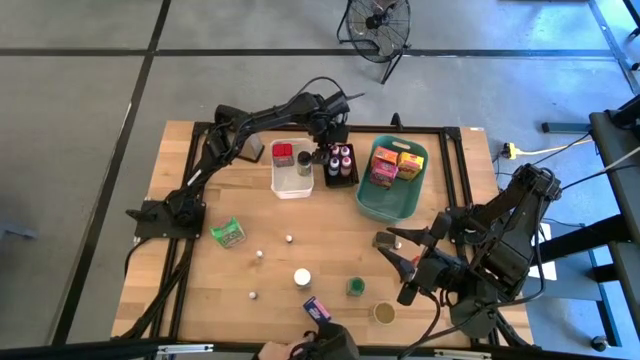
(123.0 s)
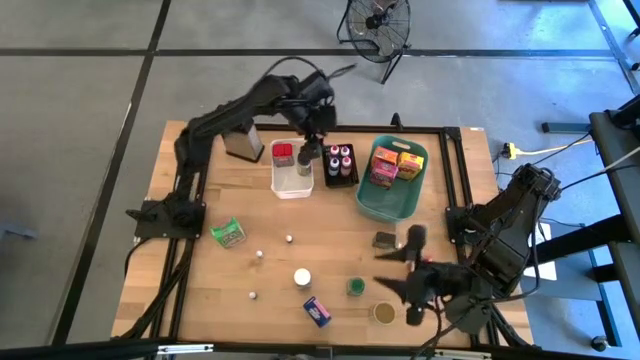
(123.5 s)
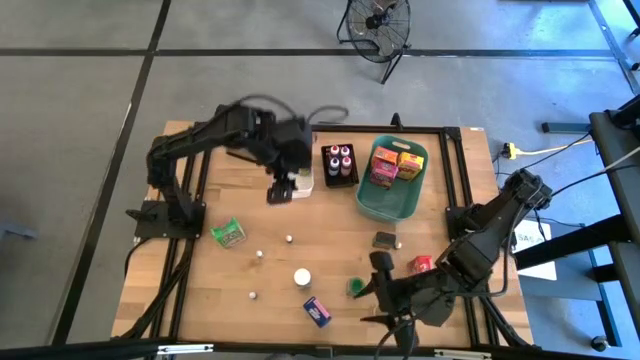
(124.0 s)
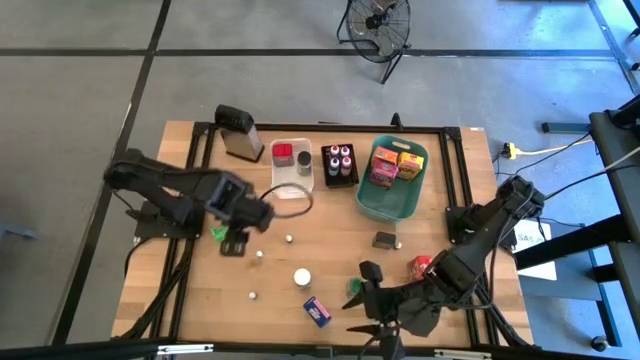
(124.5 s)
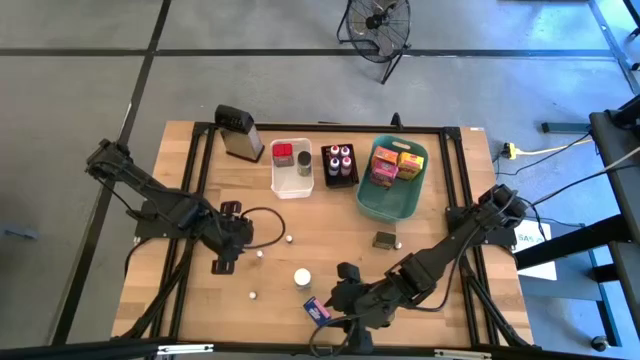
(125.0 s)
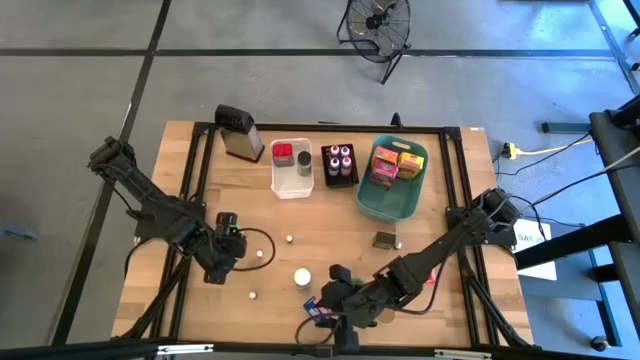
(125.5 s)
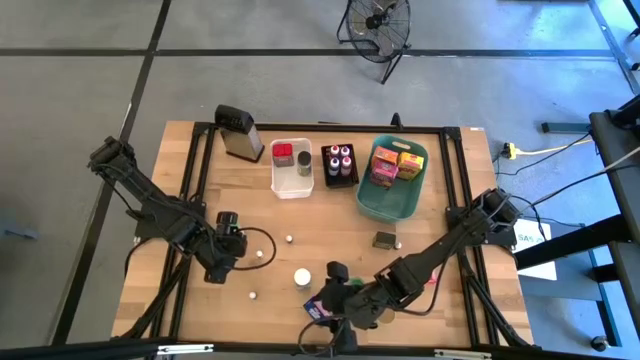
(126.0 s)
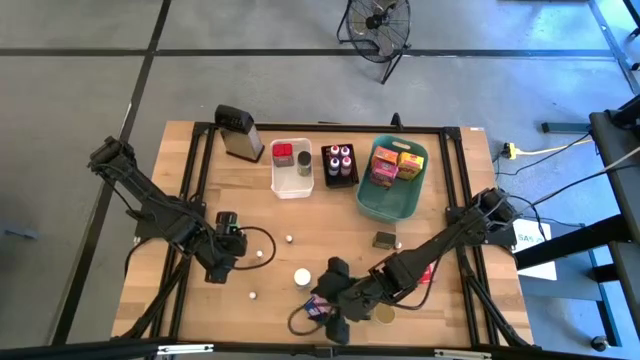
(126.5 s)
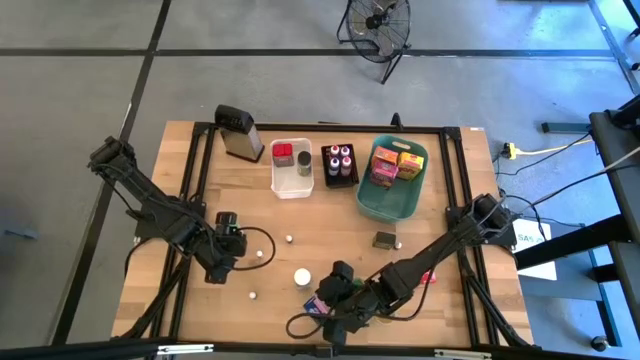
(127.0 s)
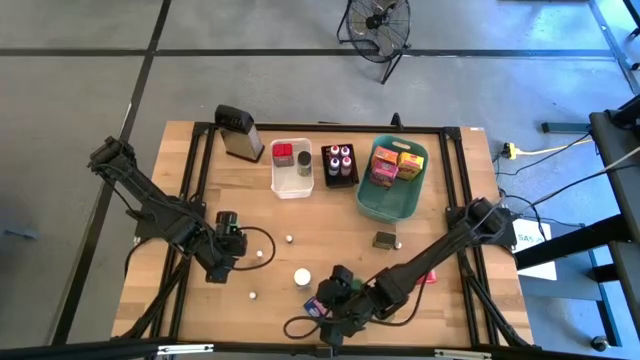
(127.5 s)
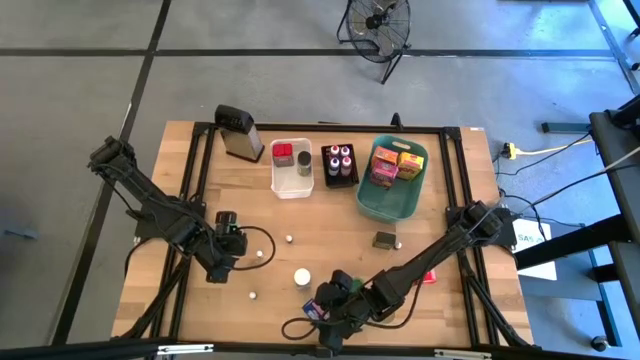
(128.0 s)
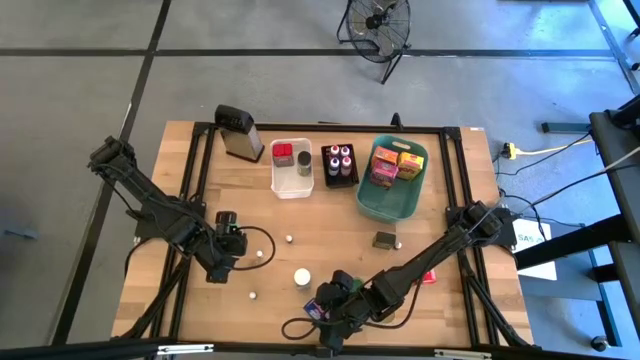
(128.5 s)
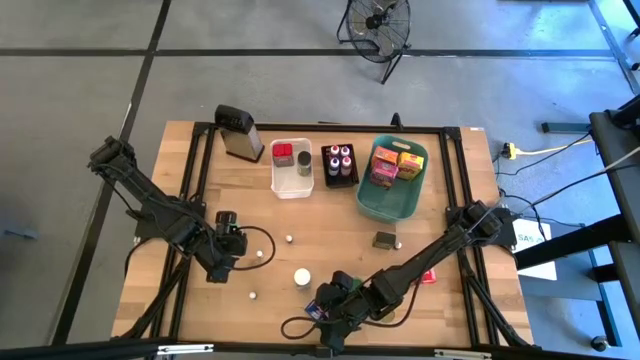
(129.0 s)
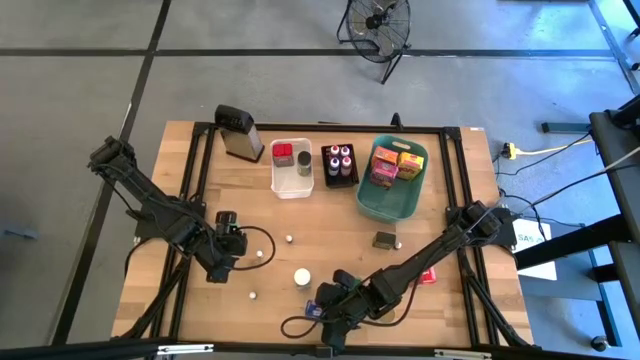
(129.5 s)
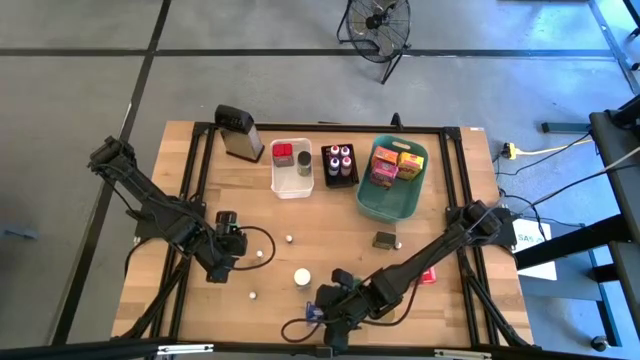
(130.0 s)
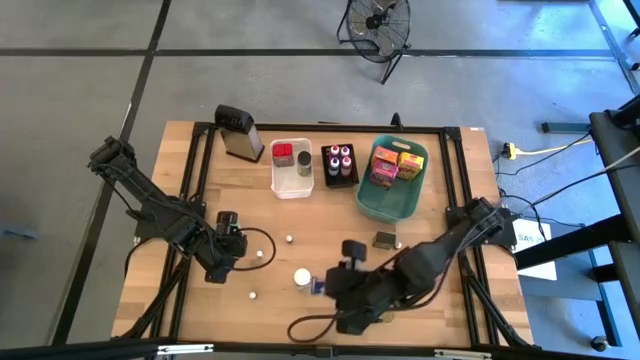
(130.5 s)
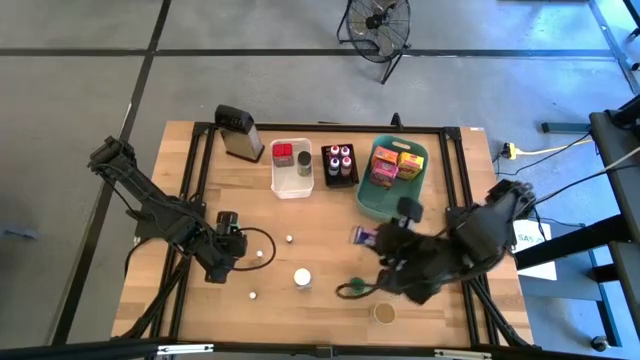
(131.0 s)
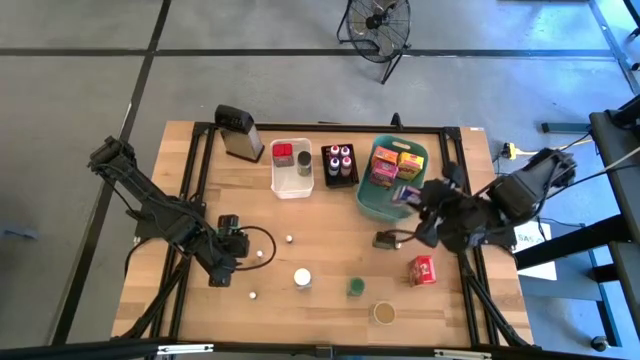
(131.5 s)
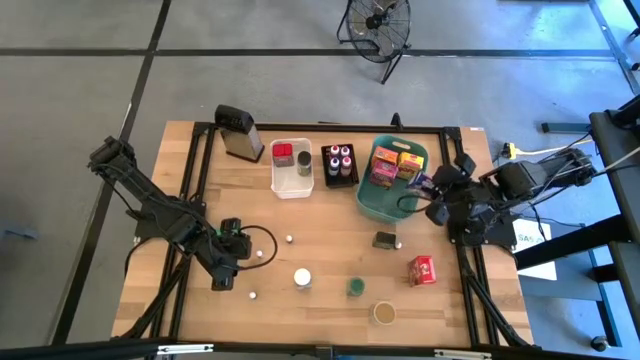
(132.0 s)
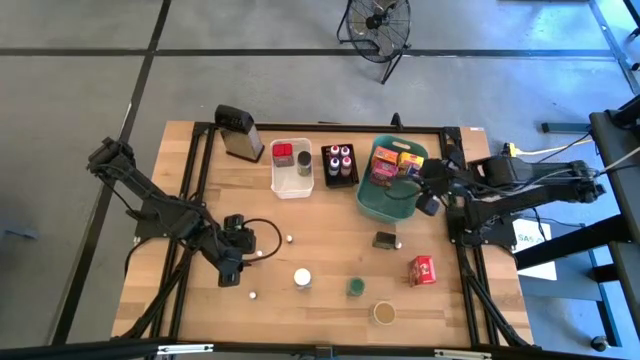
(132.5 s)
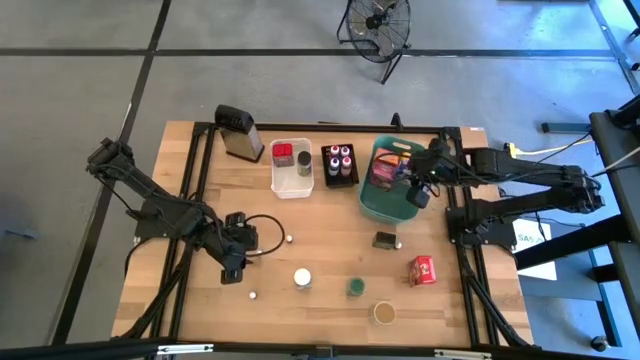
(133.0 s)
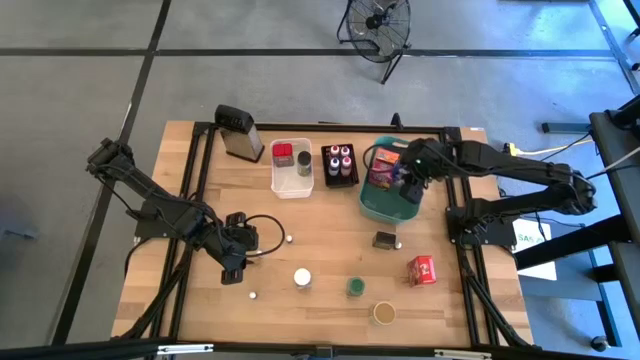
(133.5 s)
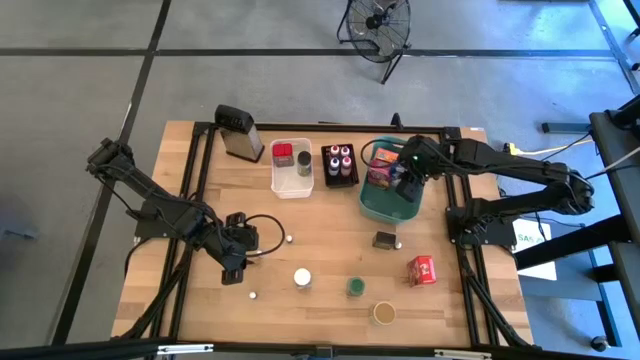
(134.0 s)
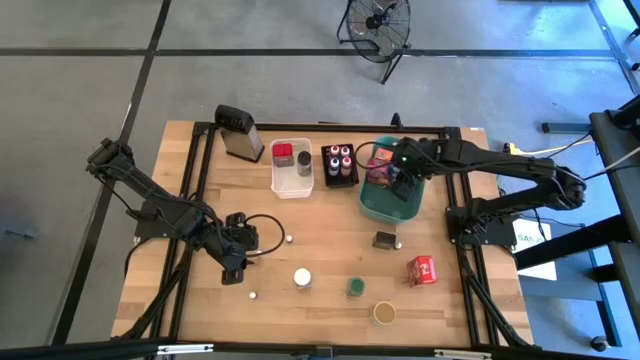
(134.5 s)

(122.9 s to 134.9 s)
Task: Pick & Place Kitchen Items
Put the blue cereal box into the green bin

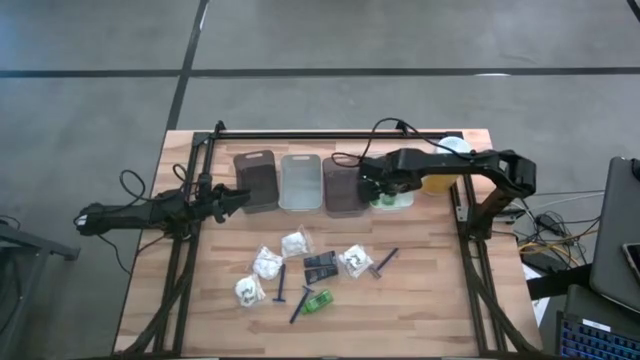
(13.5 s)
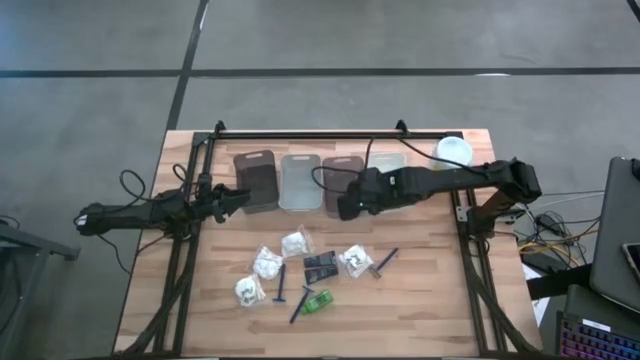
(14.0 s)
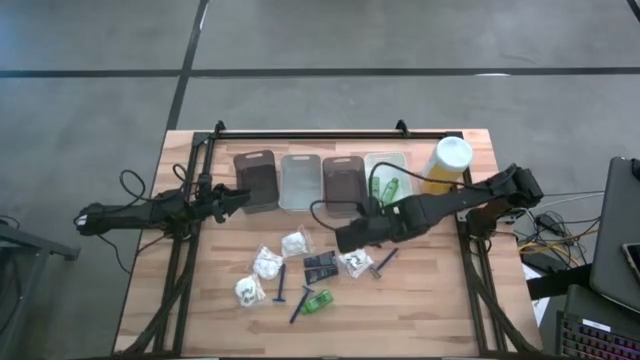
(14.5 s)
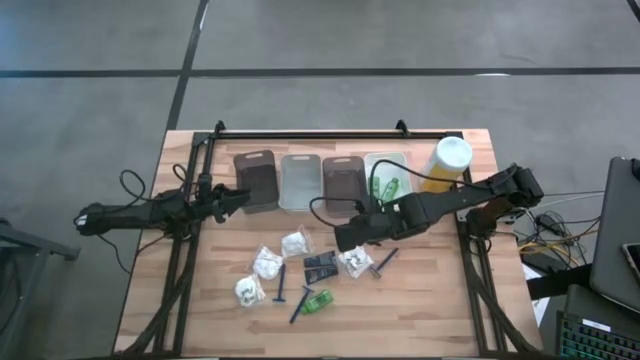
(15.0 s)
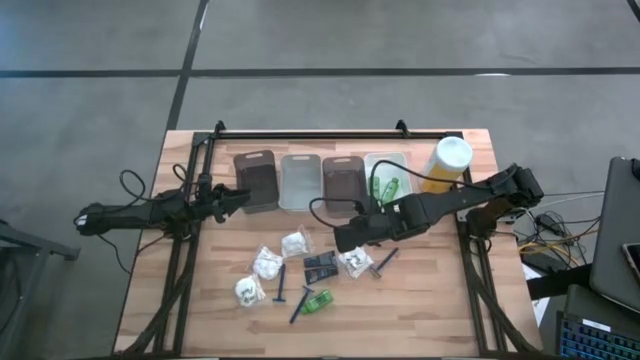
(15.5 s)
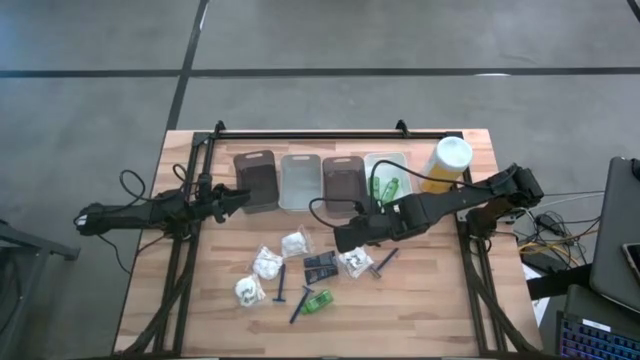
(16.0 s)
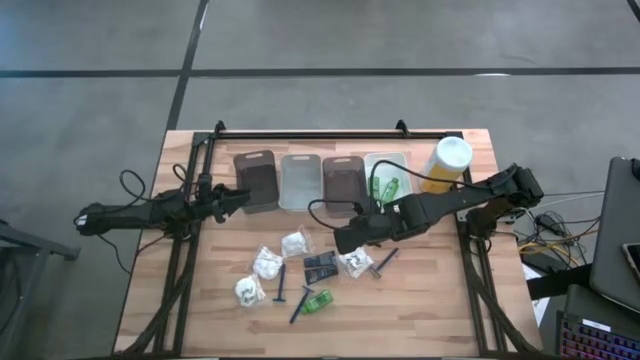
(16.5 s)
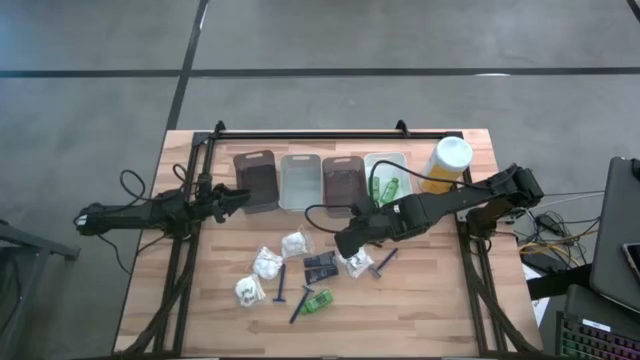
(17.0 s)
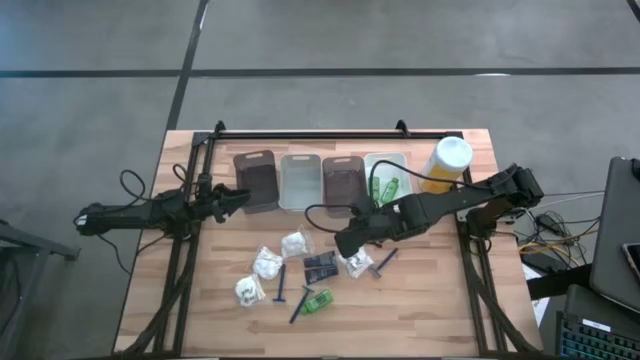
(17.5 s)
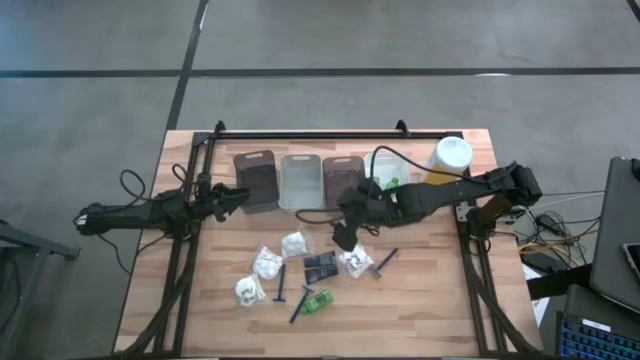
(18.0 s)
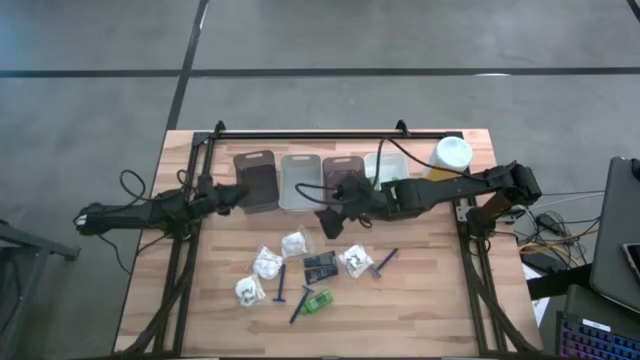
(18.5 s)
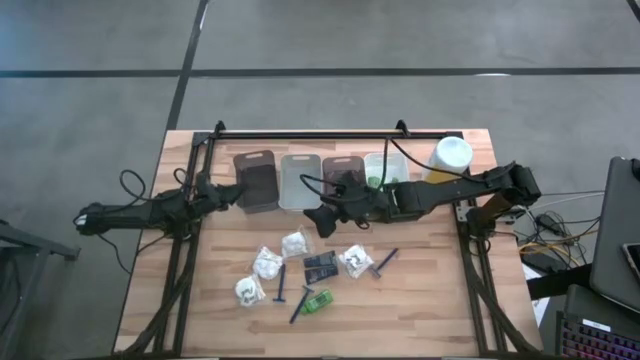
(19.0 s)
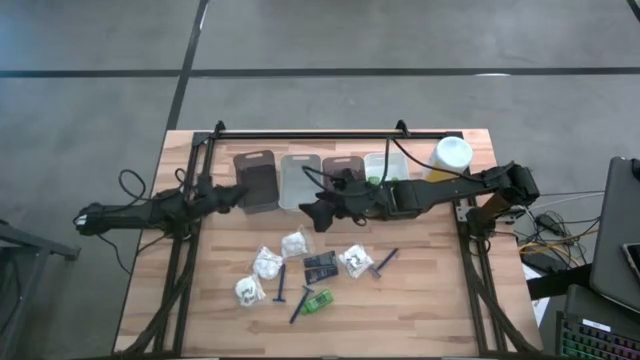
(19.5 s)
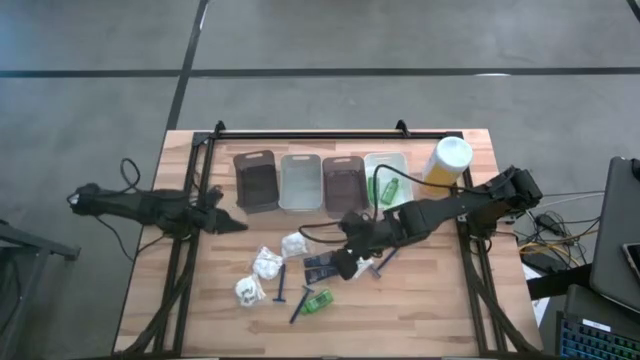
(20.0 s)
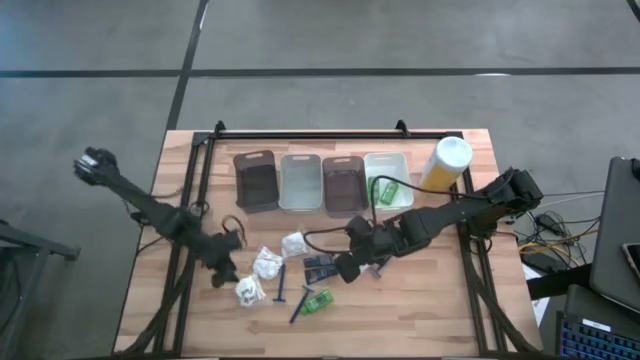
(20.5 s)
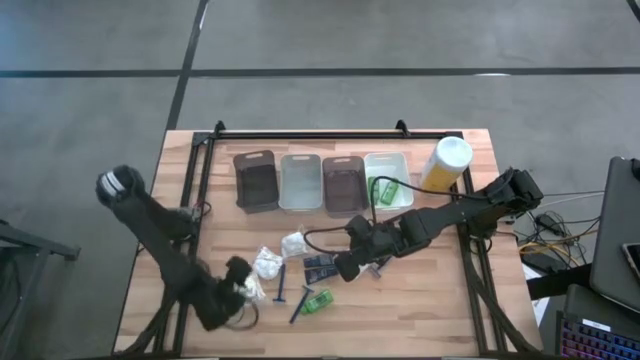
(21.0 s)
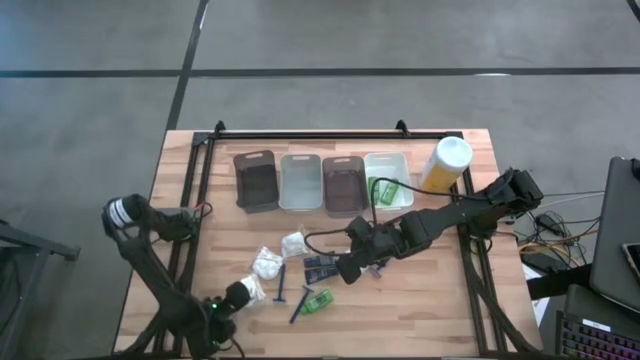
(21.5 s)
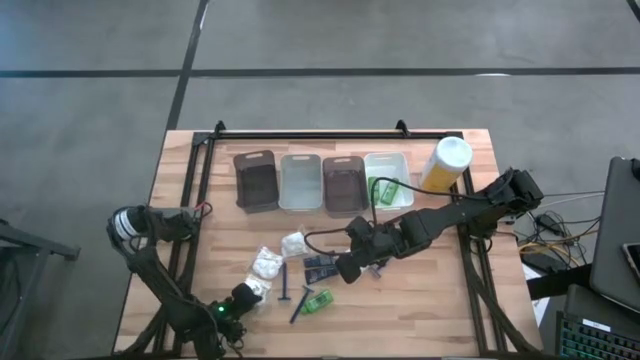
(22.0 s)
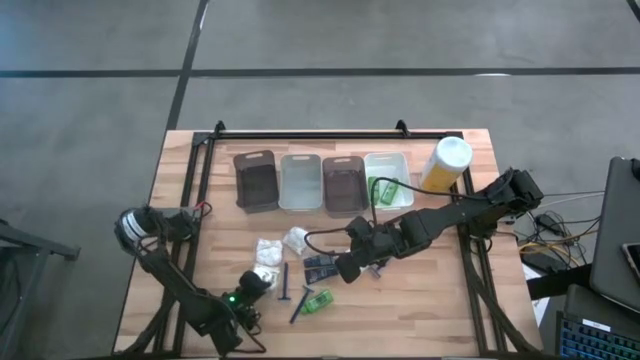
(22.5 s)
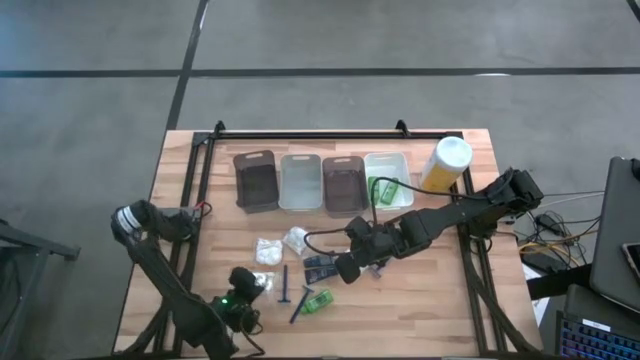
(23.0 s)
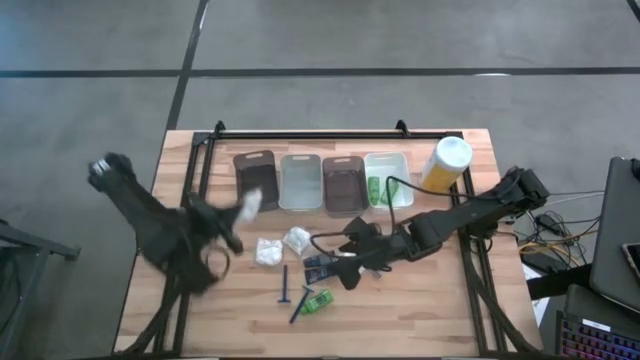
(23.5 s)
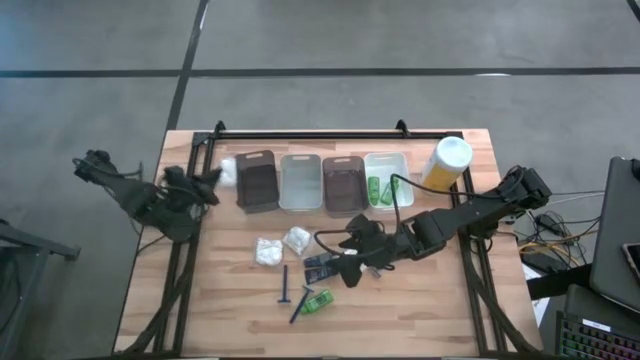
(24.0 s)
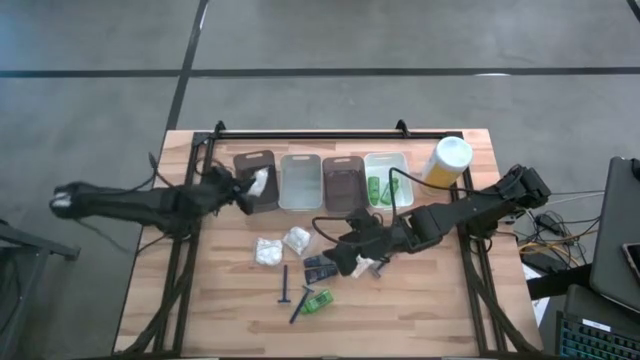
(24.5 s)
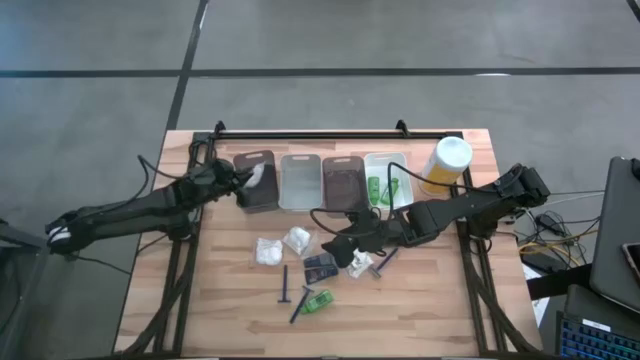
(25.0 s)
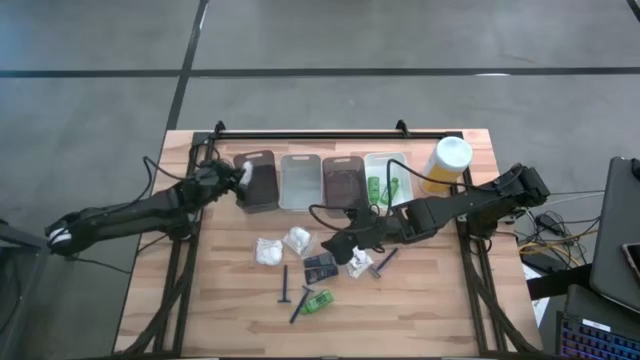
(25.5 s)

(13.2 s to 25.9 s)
Task: Pick & Place Travel size toiletries
Put the white cotton pack into the left black bin
